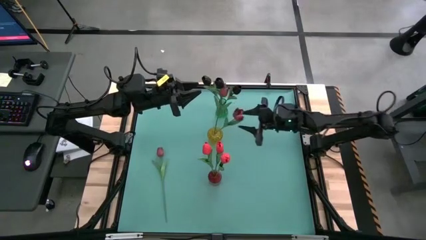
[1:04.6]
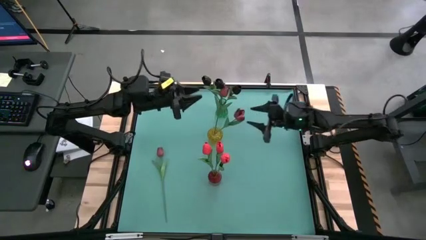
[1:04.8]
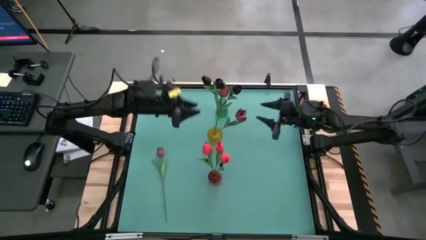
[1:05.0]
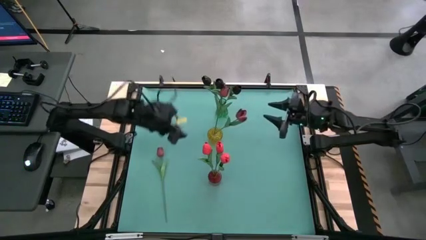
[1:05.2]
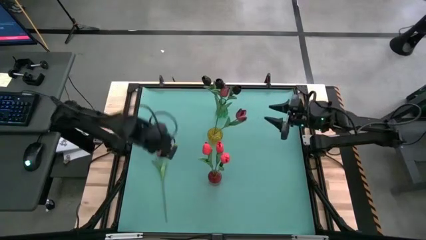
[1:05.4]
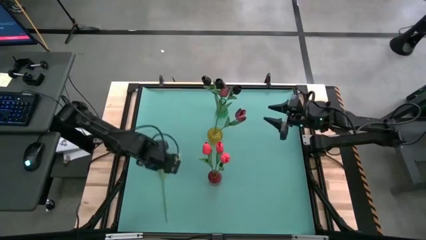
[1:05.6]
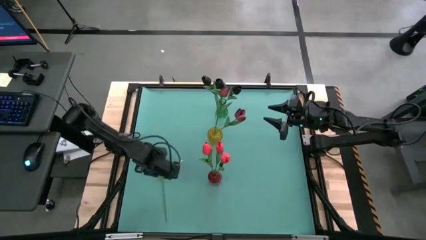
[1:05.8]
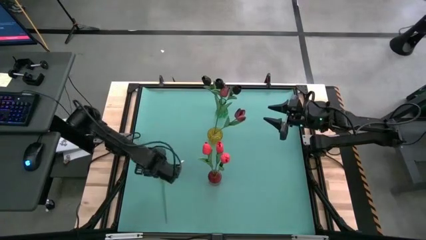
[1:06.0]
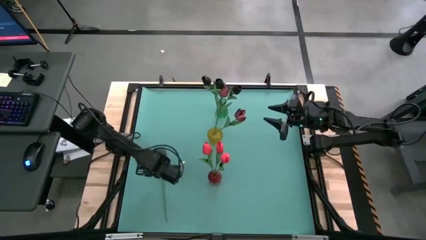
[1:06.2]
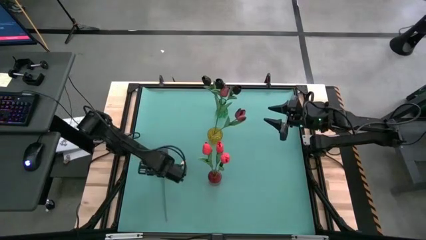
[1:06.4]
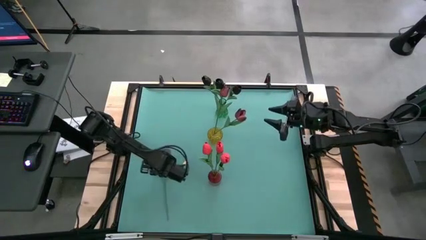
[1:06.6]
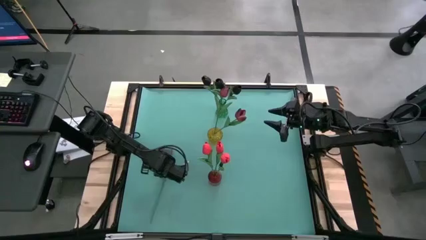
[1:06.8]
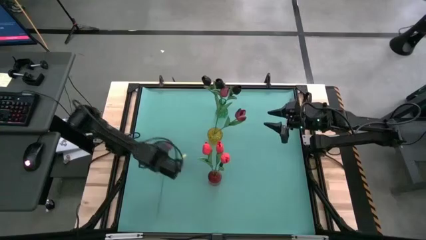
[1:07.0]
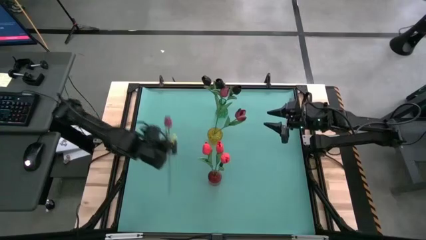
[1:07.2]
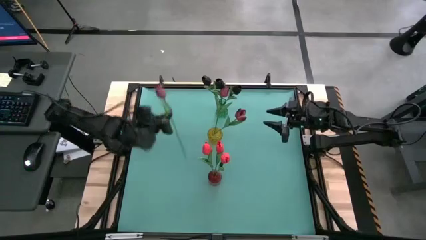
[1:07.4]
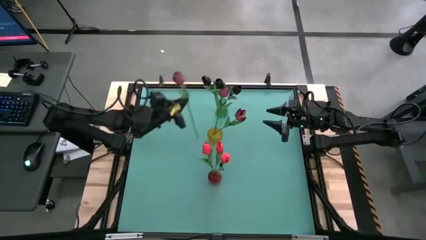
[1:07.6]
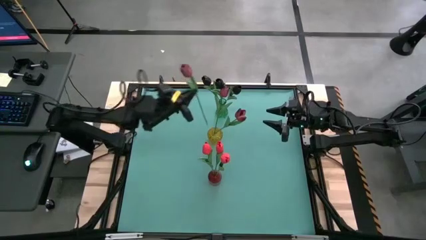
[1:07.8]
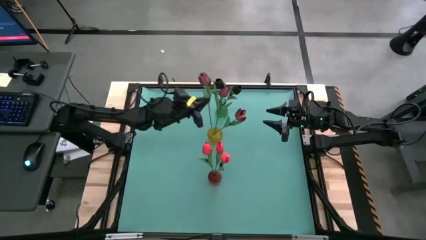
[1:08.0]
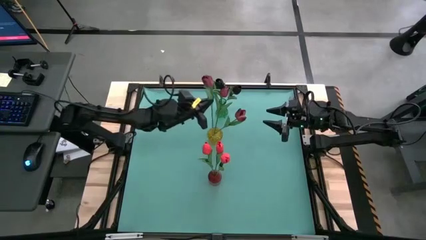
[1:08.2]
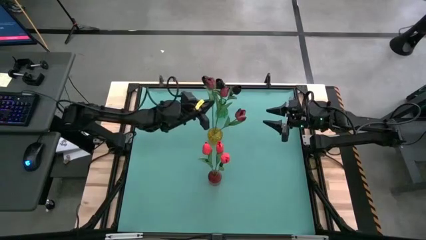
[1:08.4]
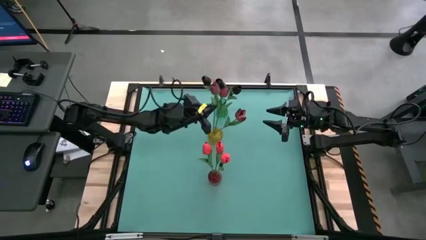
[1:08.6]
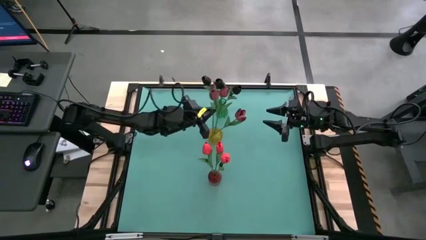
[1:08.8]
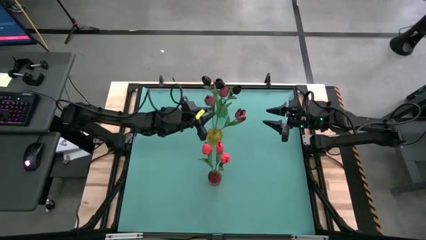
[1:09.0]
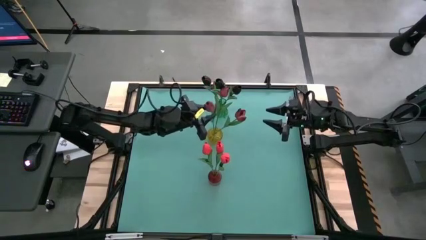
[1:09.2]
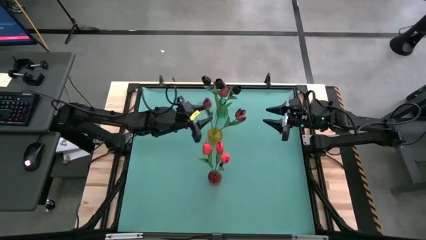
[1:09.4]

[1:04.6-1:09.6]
Task: Sort flowers into vase by color
Put the dark red tulip into the yellow vase

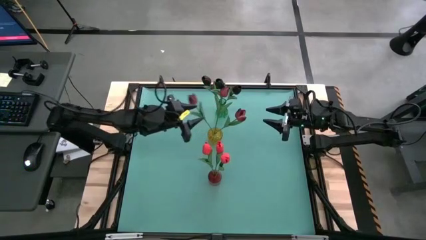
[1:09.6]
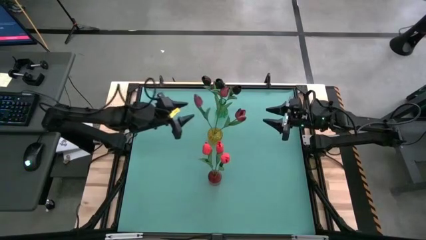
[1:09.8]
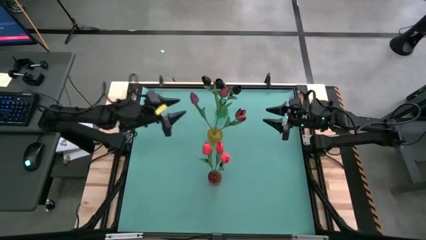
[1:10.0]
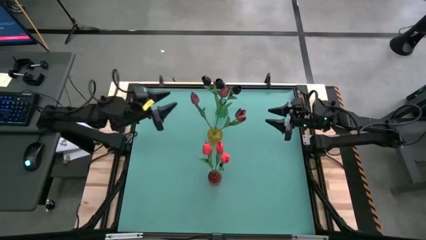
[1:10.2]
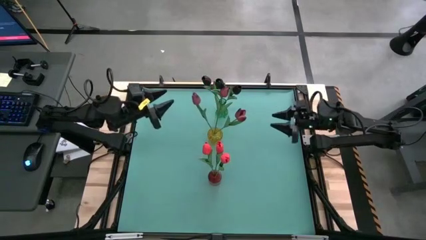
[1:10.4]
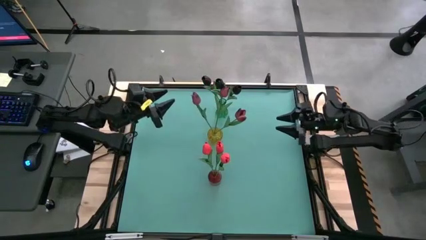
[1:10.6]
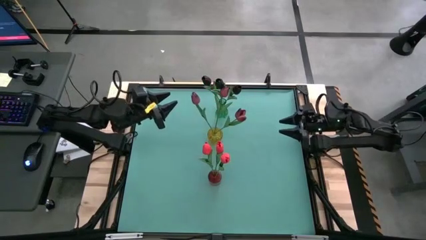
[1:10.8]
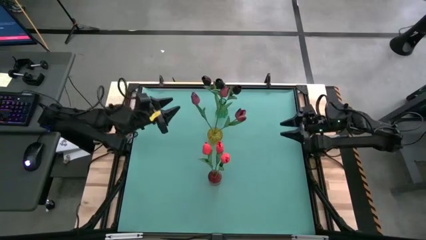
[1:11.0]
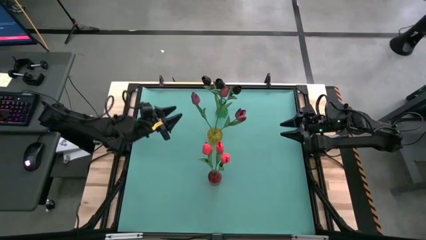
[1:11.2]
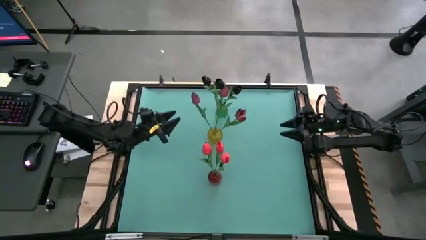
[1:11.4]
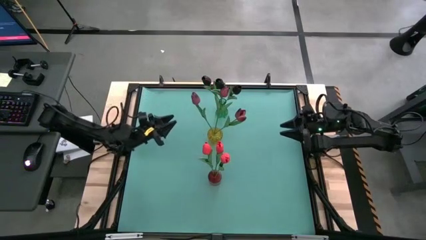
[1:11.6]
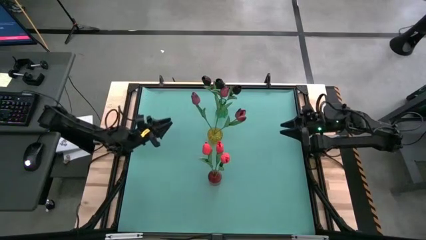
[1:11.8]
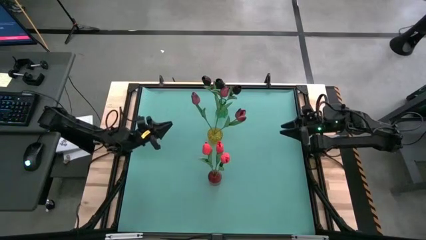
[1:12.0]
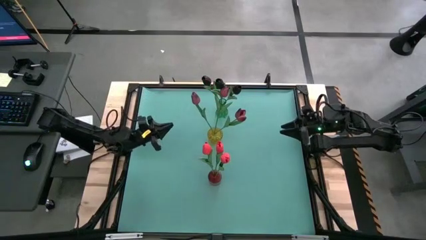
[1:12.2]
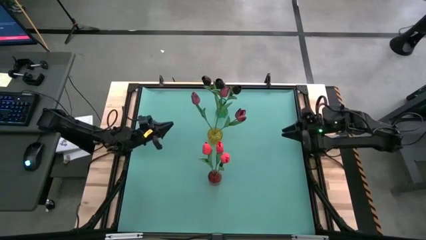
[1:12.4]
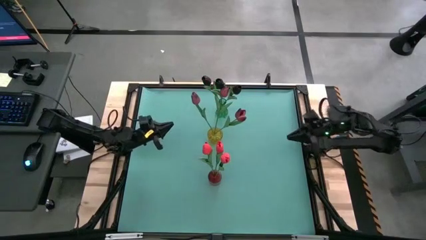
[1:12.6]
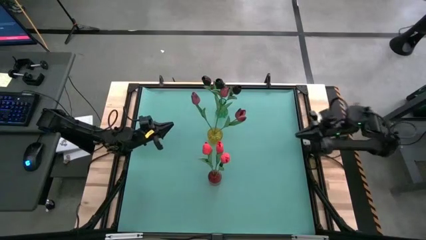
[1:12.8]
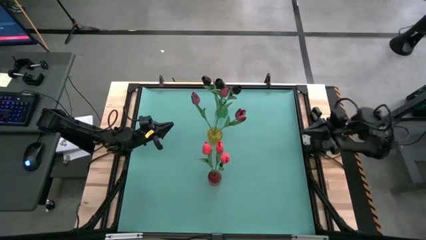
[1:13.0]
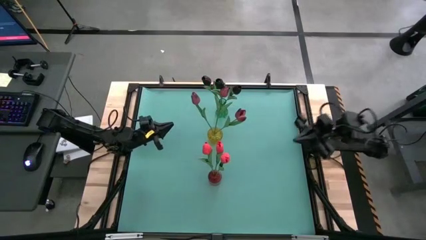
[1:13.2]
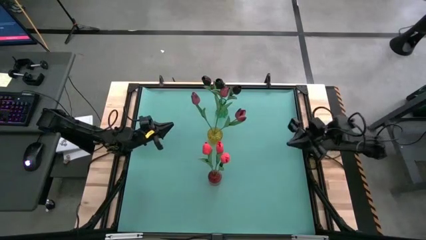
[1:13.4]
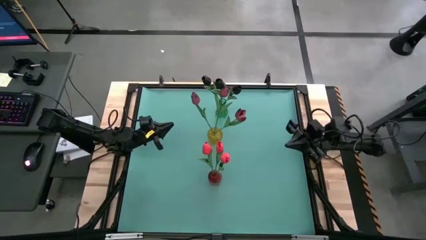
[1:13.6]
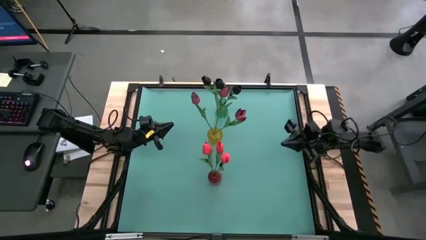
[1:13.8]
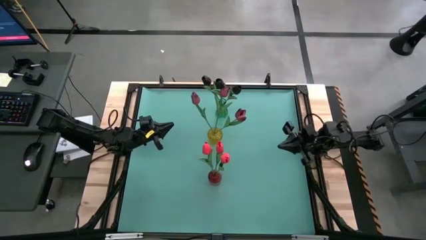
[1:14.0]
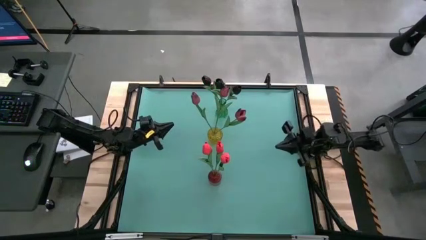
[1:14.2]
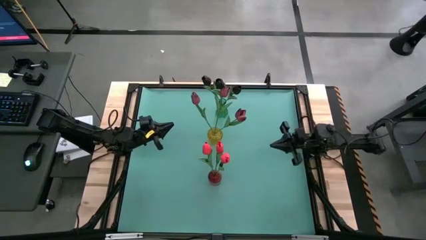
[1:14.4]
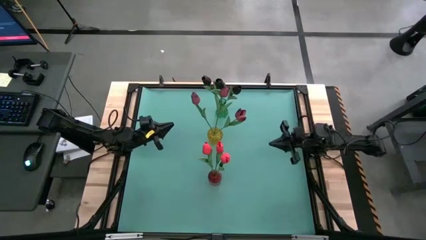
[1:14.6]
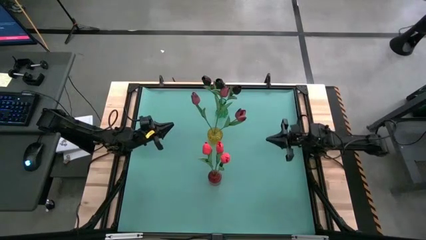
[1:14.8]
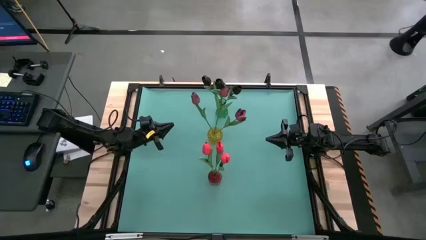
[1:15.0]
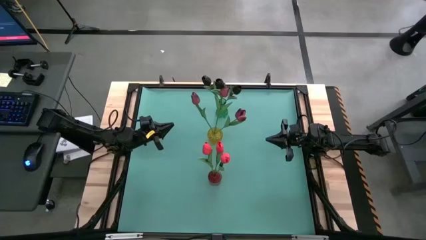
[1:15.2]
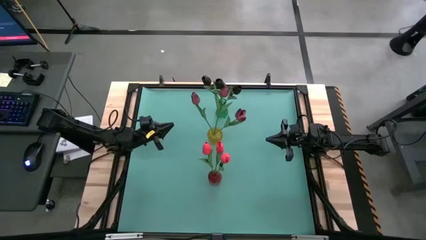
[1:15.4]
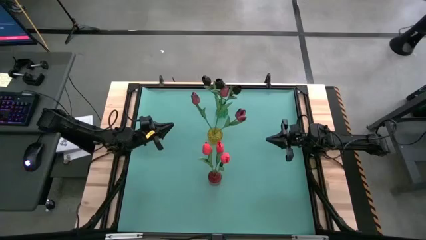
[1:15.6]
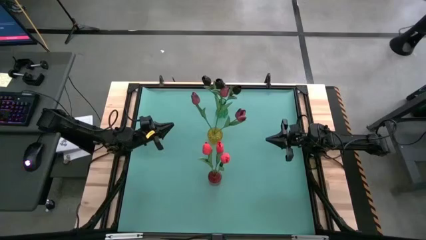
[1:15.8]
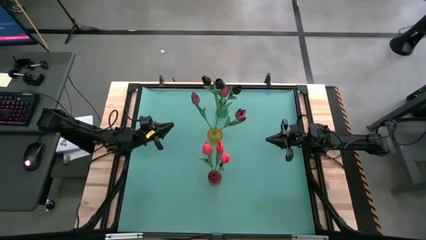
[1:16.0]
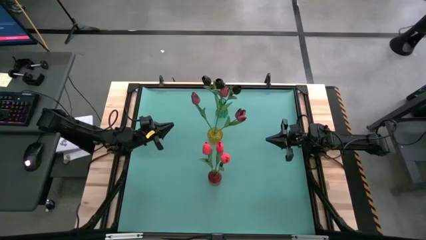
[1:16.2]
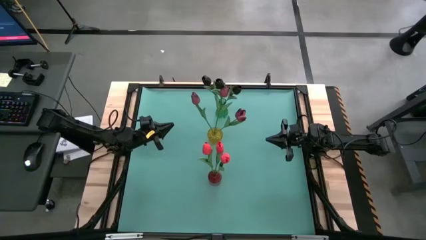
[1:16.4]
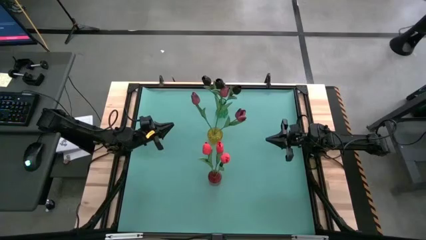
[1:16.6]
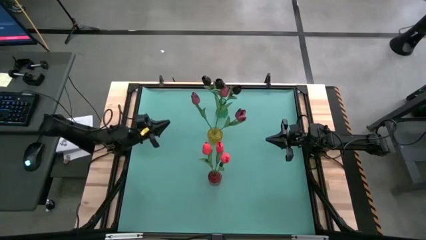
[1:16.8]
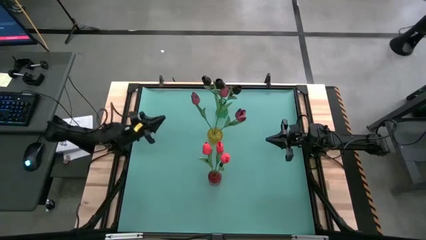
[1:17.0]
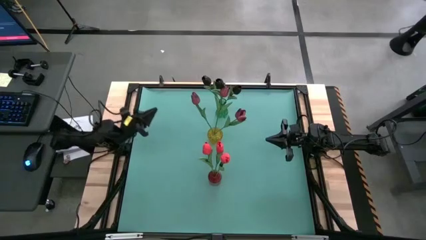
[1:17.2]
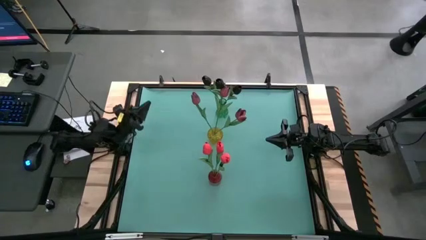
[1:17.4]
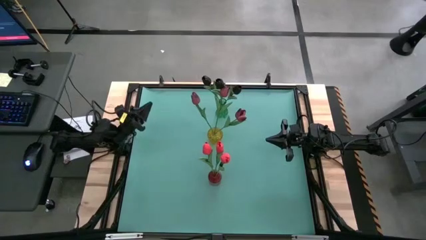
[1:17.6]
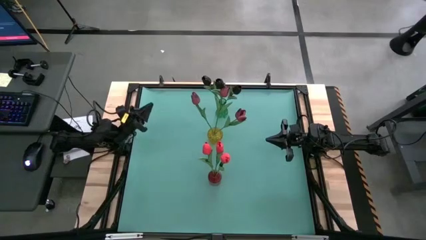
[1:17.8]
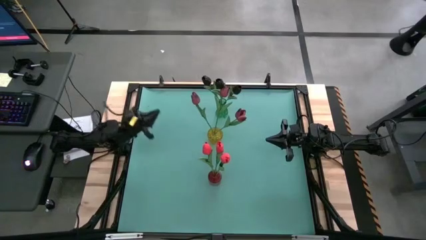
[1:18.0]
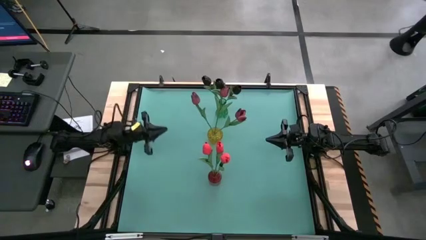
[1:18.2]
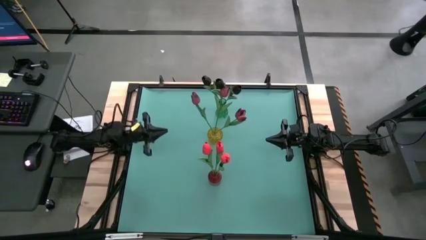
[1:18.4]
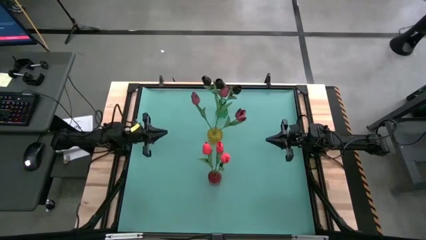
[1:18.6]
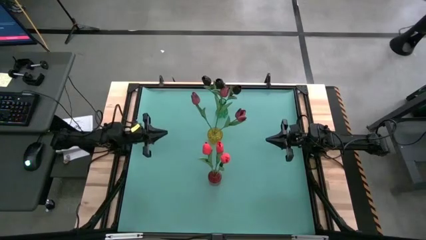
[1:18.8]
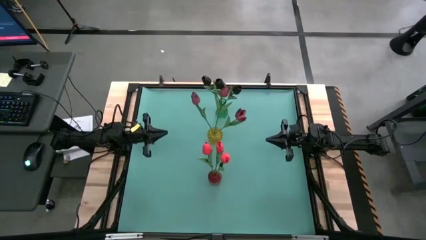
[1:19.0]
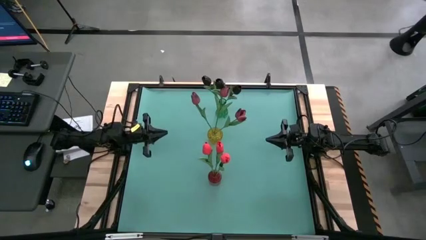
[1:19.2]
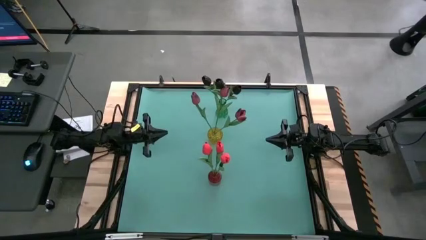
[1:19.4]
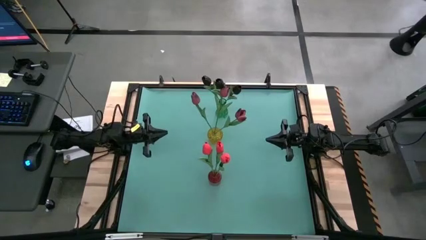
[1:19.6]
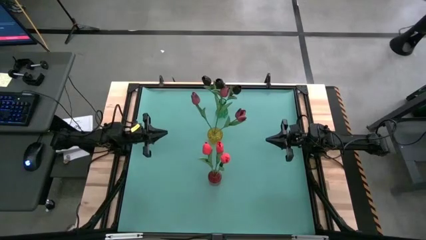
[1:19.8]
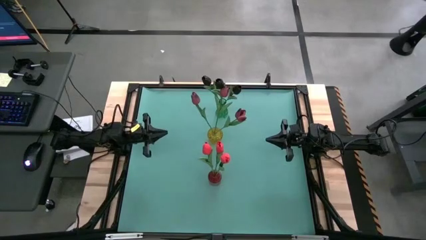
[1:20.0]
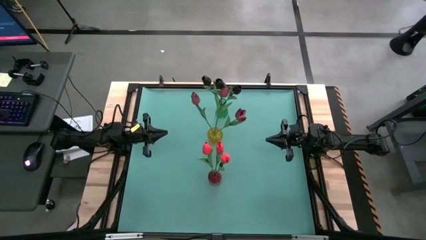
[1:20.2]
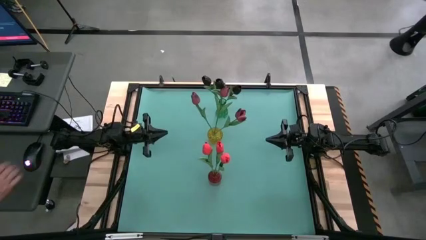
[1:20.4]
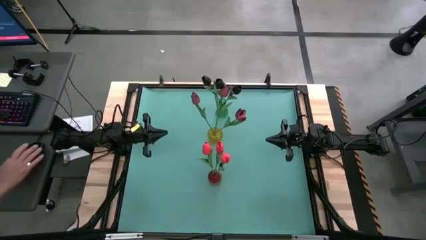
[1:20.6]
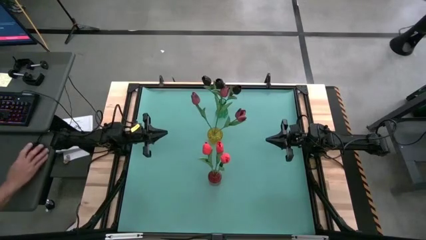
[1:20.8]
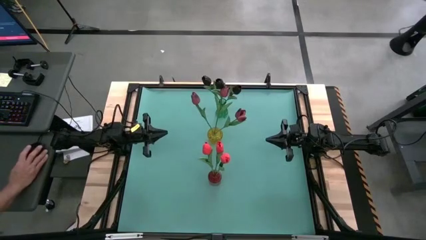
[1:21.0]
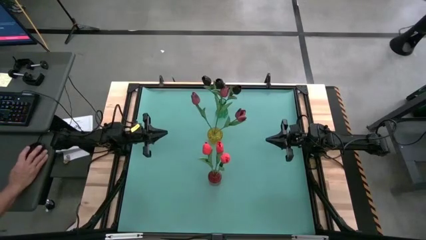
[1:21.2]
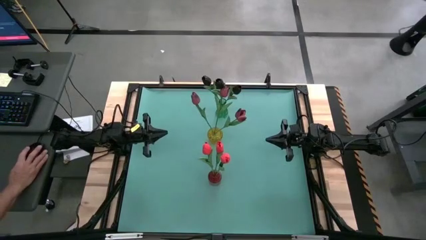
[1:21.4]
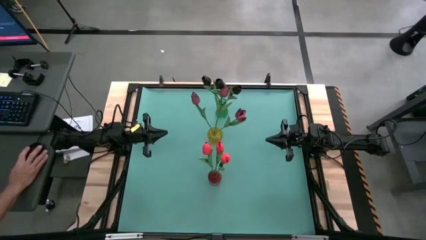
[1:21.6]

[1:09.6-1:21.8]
Return to Home Position
